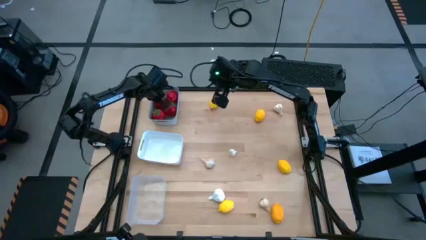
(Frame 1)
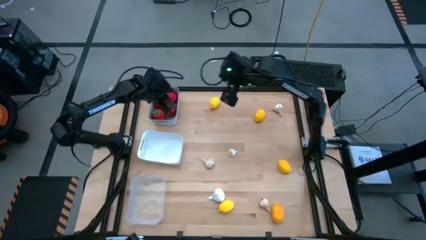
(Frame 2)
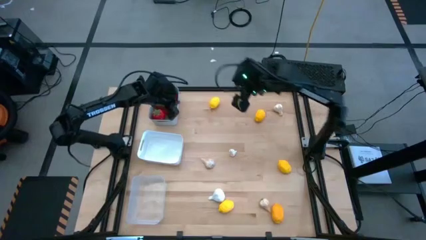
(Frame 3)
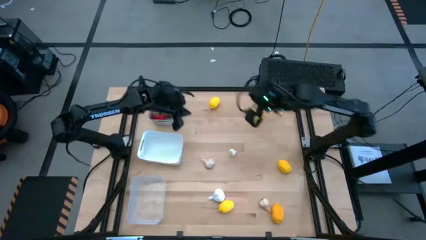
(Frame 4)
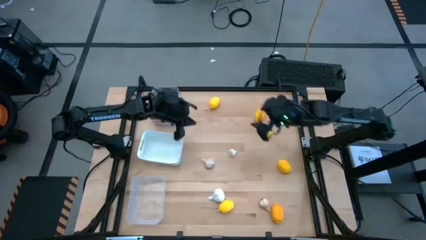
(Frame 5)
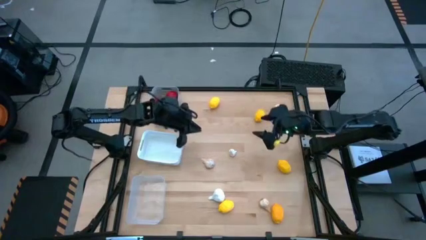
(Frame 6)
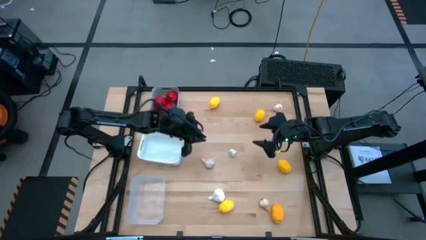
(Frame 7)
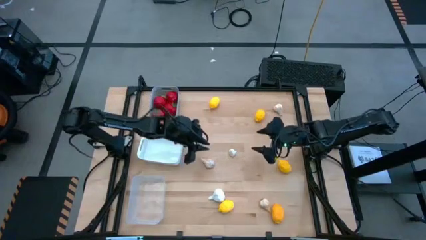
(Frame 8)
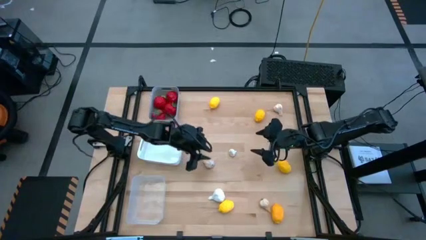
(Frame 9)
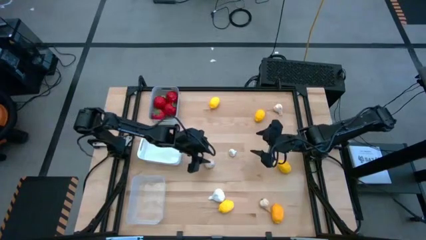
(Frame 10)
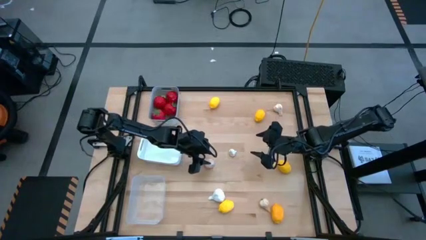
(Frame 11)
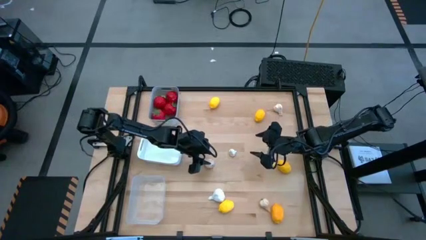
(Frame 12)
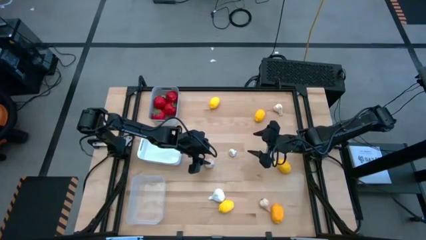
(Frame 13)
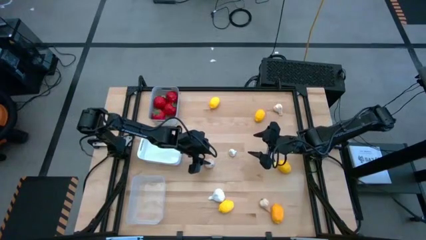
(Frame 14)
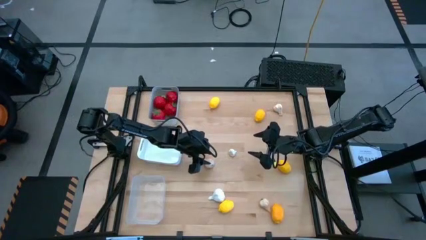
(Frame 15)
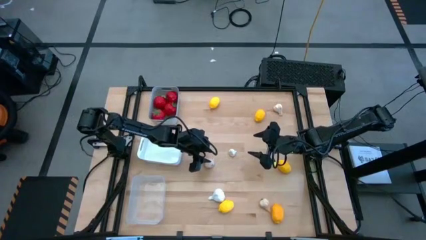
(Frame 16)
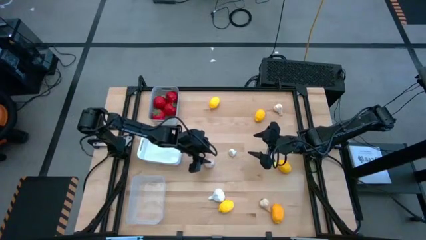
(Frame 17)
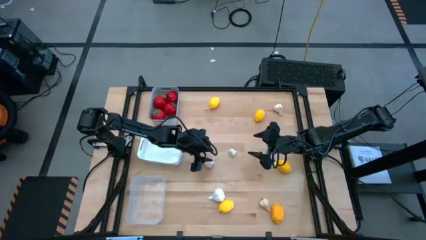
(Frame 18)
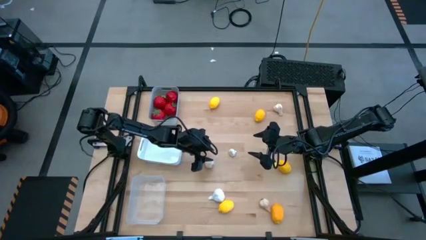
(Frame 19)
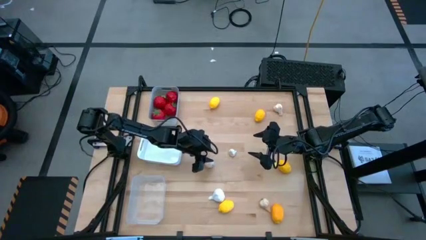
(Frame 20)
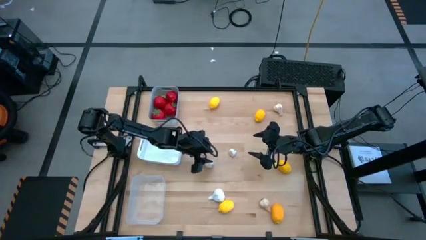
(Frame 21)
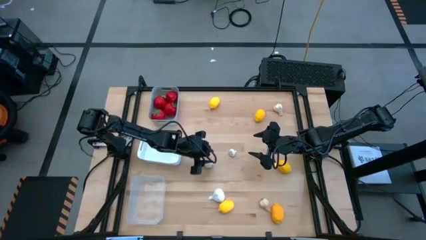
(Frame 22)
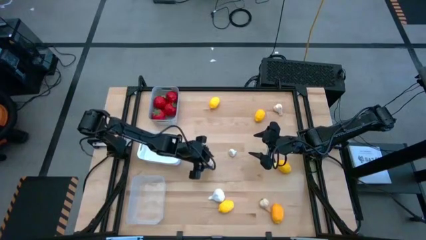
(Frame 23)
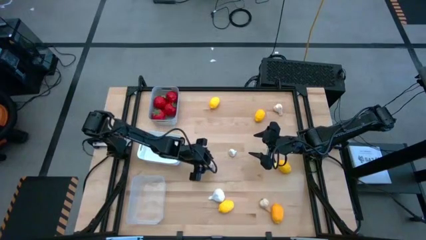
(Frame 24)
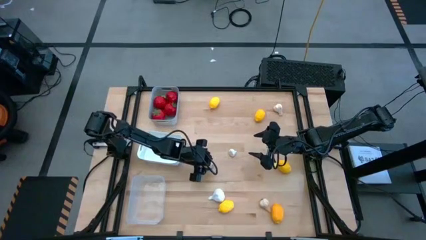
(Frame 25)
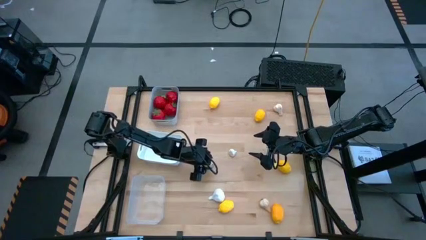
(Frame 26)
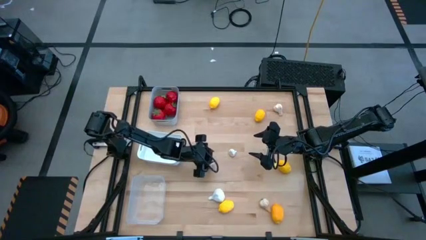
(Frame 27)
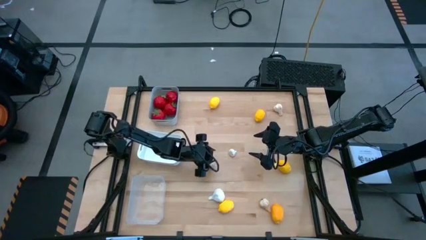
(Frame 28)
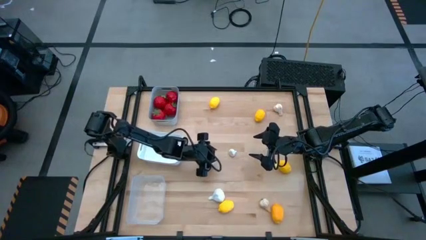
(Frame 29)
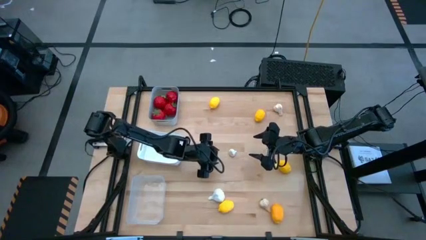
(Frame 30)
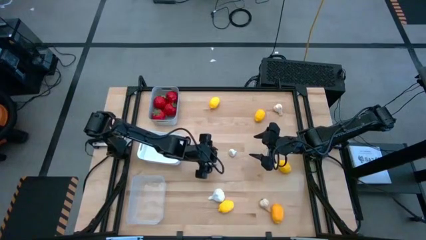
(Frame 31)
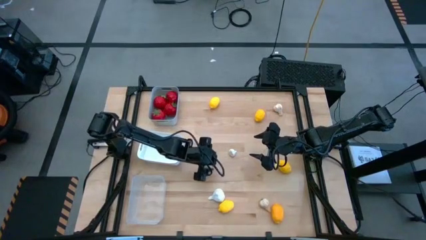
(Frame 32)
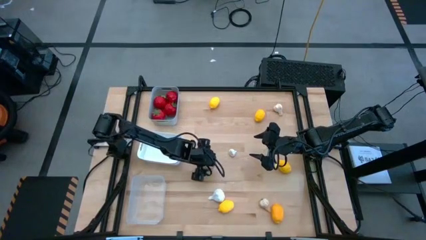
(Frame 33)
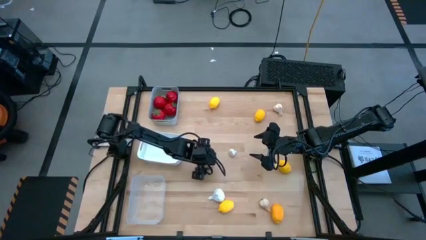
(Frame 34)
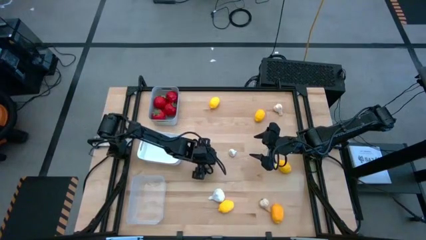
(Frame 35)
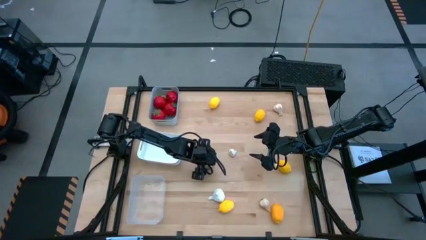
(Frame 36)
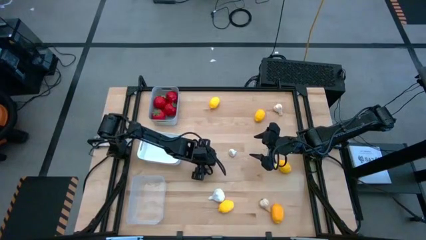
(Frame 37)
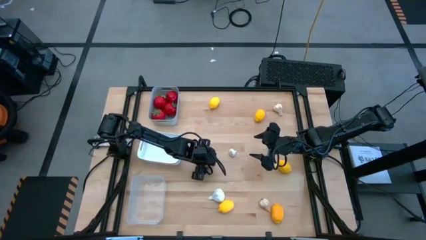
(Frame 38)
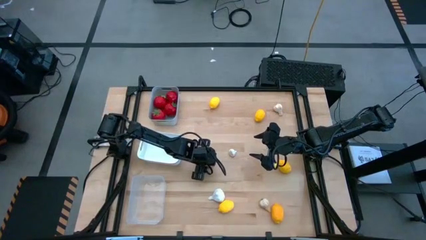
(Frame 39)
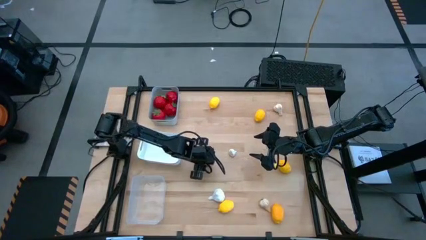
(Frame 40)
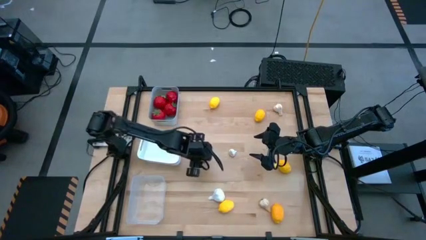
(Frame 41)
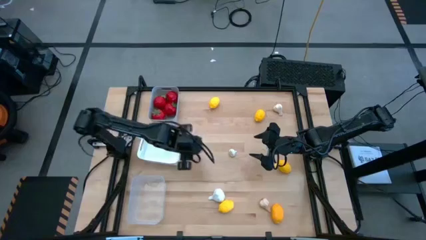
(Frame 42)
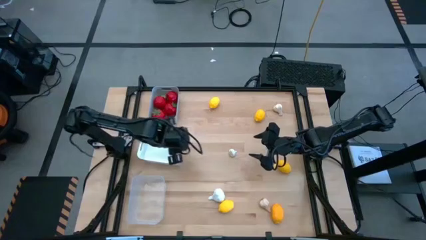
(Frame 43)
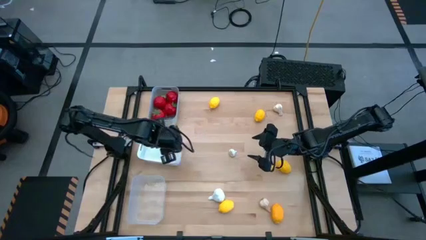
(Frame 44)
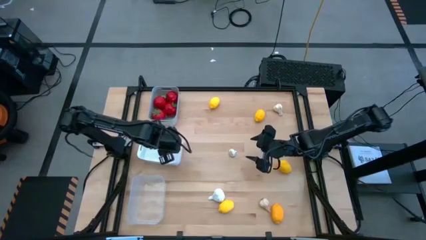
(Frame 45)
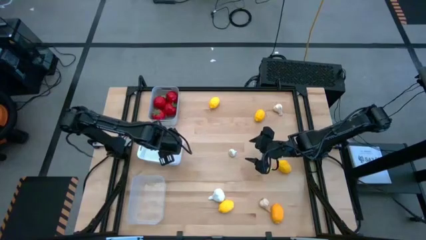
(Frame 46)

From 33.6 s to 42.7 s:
Task: Sort produce into baskets
Put the white garlic into the white bin

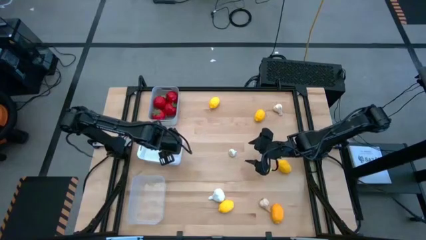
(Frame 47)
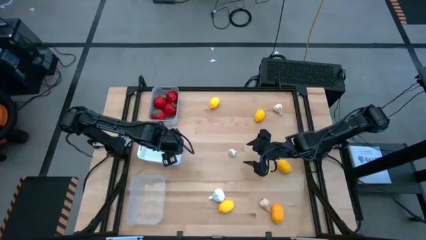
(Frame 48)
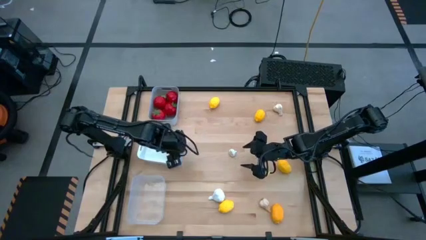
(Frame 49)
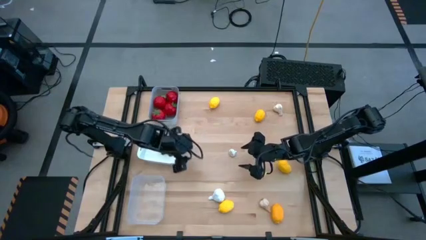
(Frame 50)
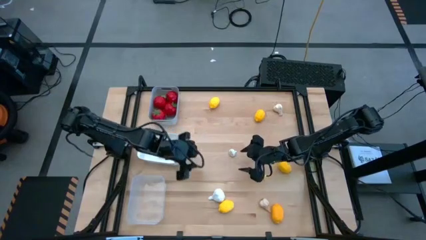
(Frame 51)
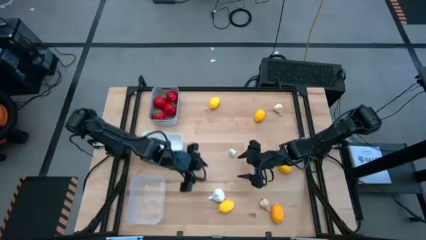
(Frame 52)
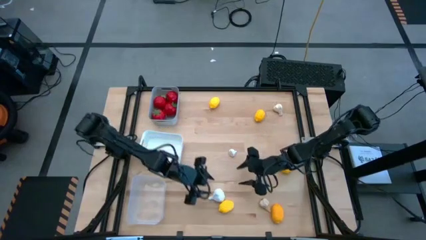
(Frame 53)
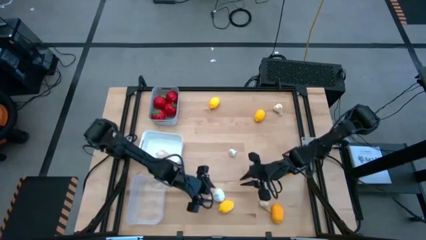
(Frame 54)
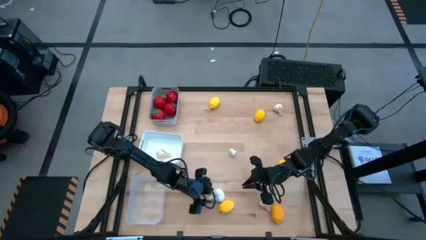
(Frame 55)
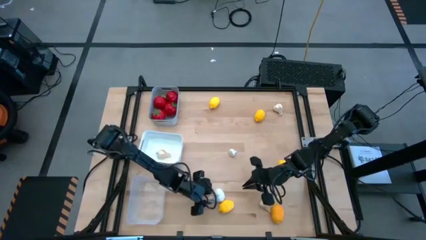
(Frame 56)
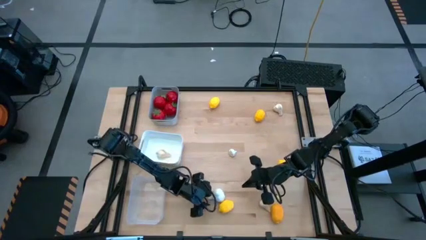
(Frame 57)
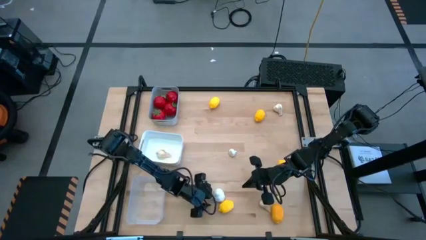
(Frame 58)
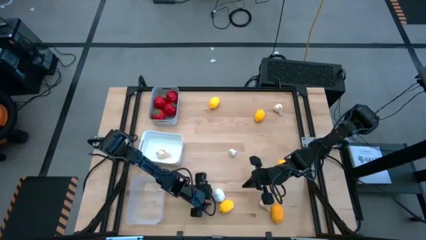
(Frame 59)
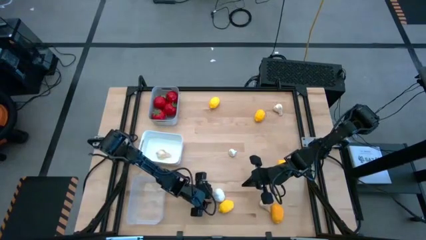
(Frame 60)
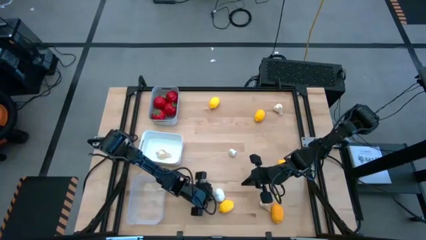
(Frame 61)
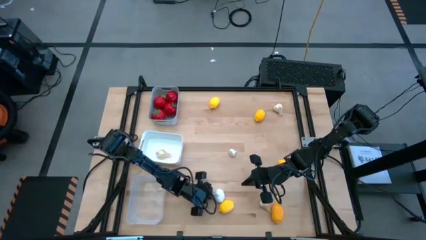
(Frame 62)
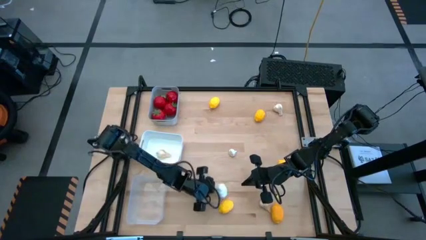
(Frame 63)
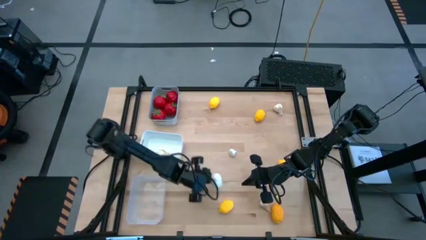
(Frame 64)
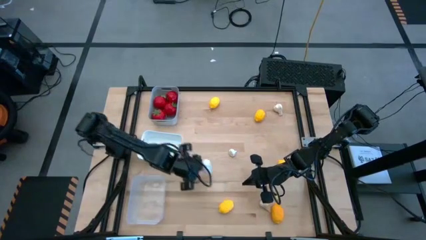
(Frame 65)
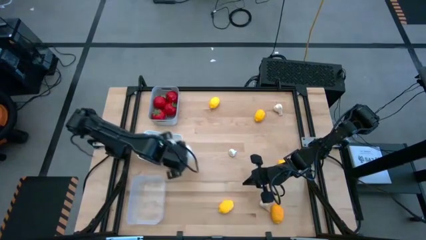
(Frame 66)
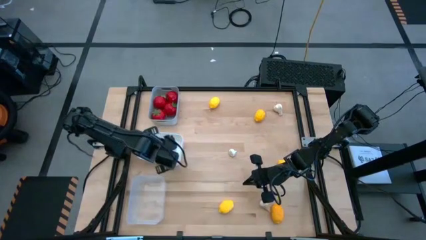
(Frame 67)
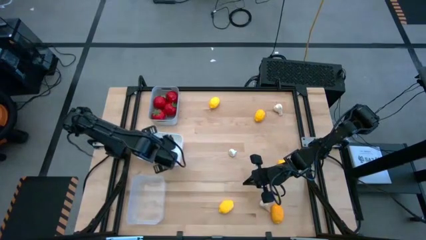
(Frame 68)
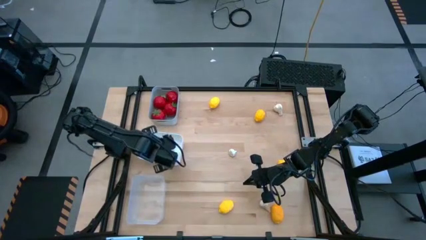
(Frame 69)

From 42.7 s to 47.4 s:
Put the white garlic into the white bin

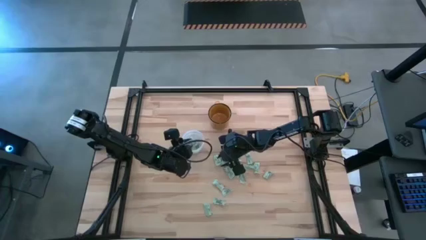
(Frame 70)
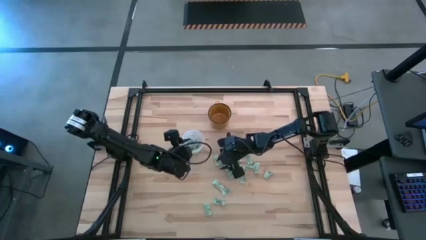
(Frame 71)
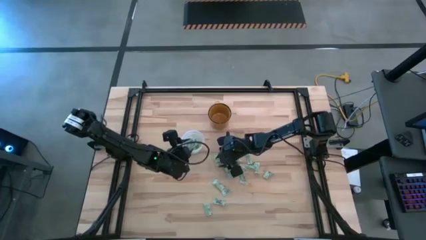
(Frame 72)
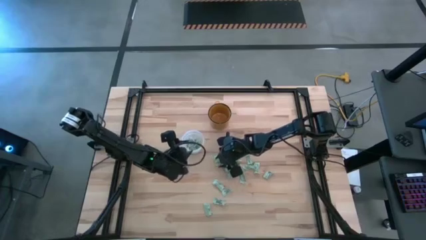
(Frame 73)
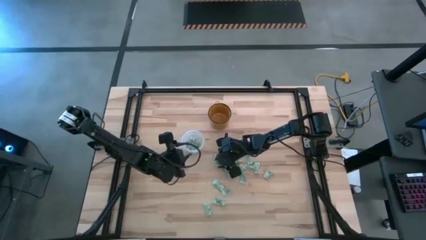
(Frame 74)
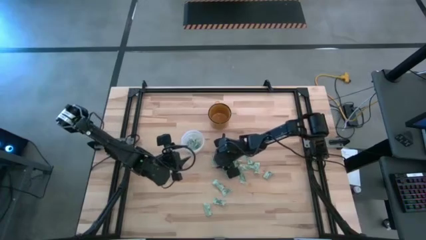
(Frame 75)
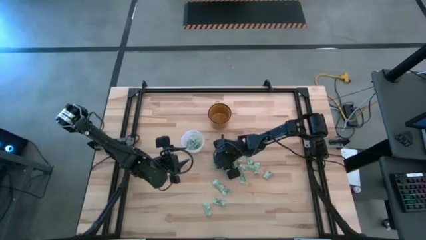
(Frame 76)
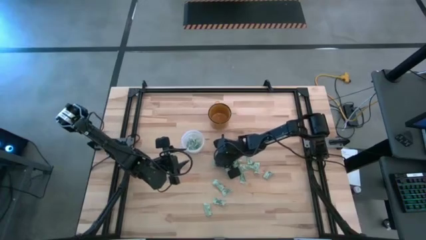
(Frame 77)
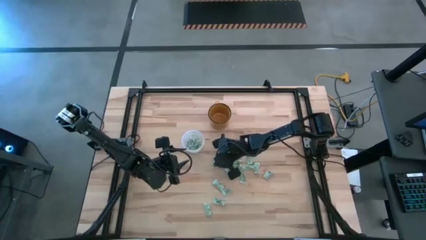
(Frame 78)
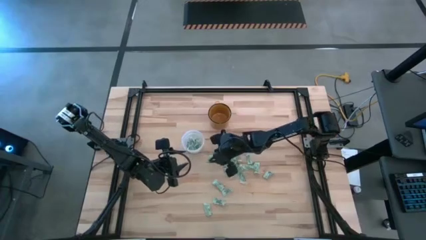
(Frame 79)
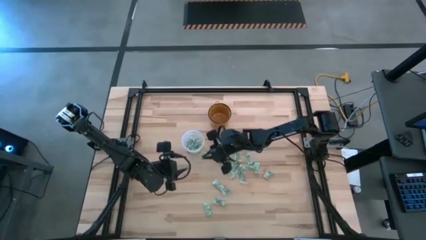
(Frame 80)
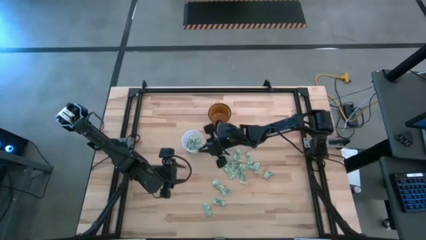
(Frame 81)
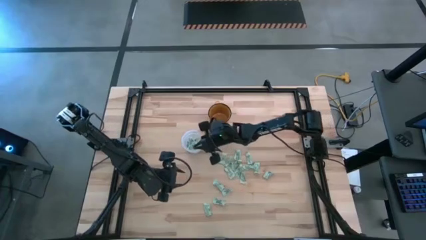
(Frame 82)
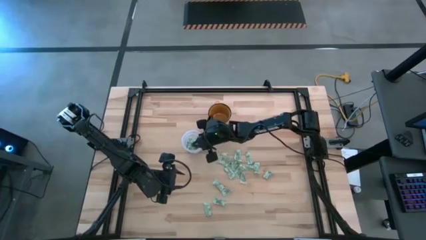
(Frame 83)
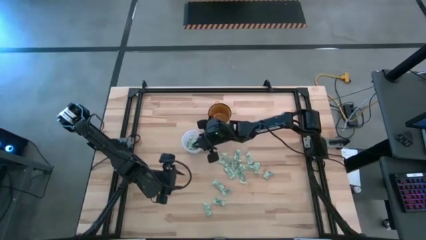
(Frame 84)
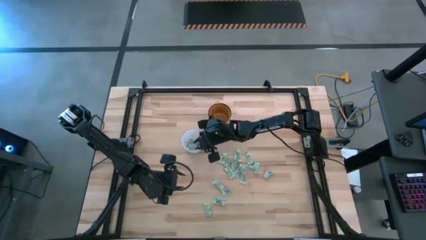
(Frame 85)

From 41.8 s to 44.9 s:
Task: Pick and place Stevia / Truvia into bins
Put the stevia packet into the transparent bin
